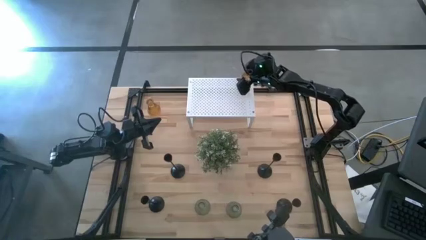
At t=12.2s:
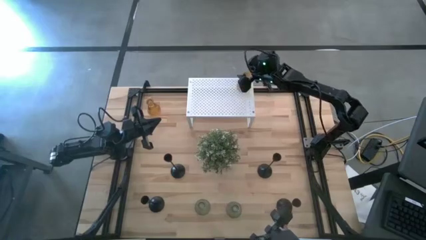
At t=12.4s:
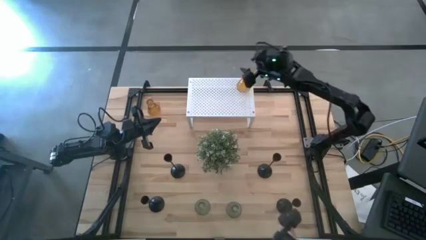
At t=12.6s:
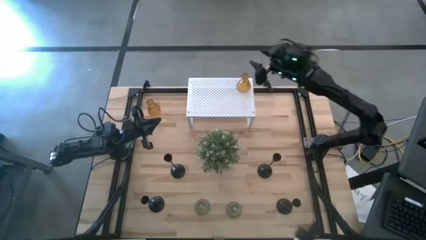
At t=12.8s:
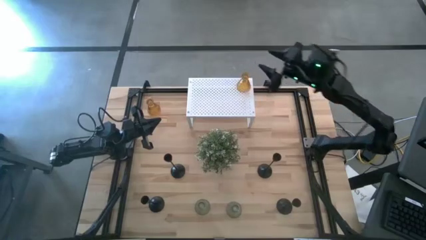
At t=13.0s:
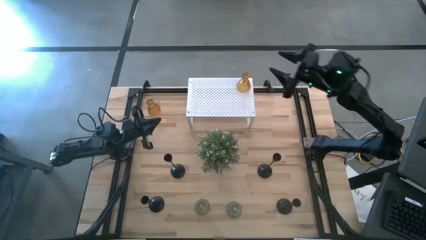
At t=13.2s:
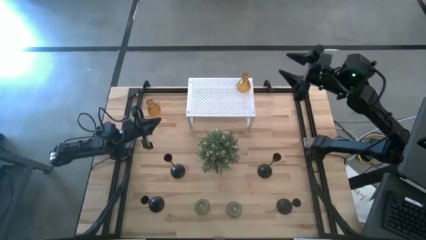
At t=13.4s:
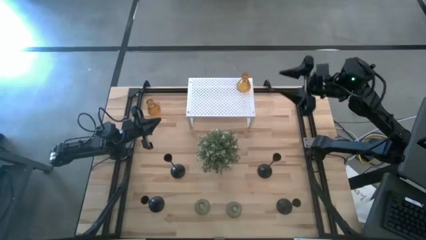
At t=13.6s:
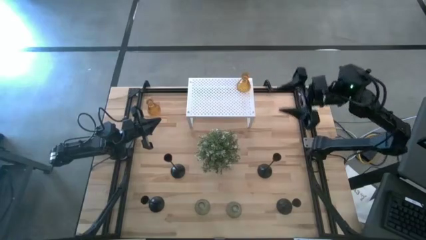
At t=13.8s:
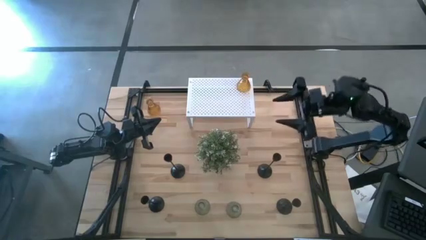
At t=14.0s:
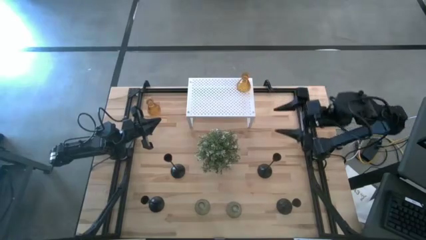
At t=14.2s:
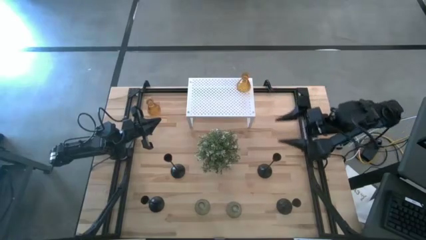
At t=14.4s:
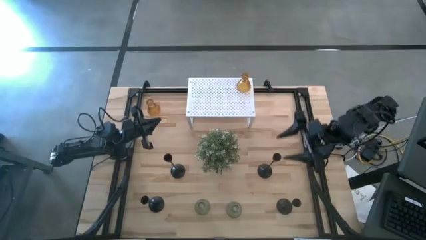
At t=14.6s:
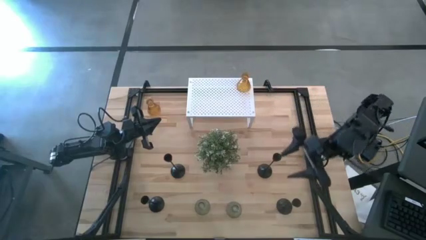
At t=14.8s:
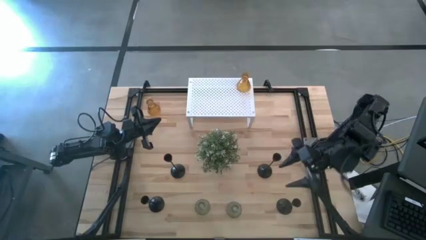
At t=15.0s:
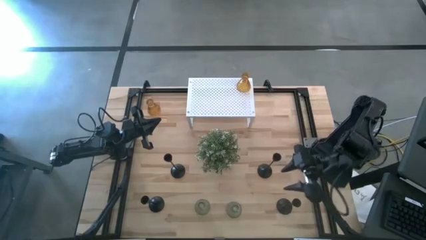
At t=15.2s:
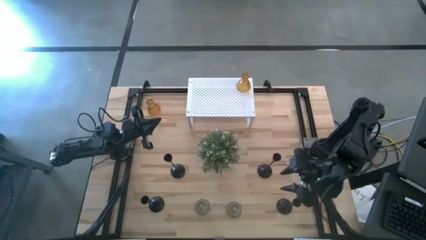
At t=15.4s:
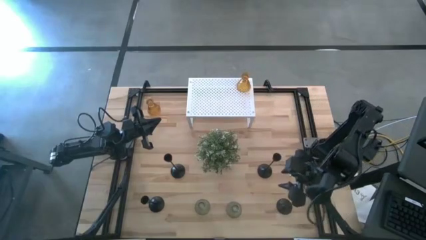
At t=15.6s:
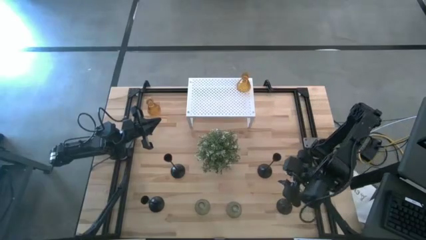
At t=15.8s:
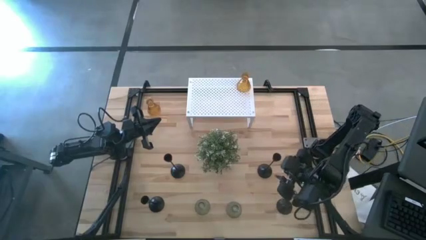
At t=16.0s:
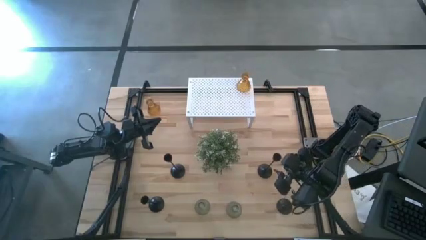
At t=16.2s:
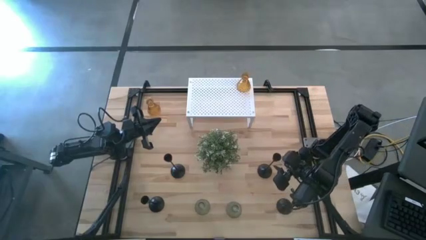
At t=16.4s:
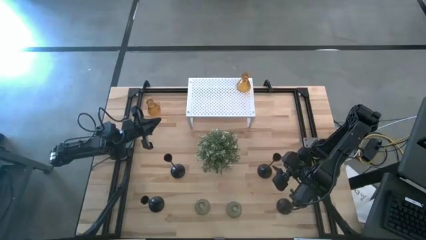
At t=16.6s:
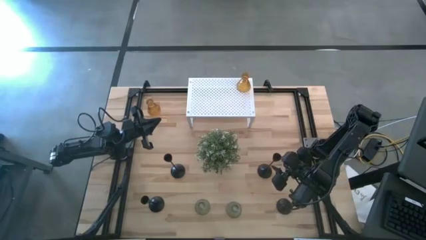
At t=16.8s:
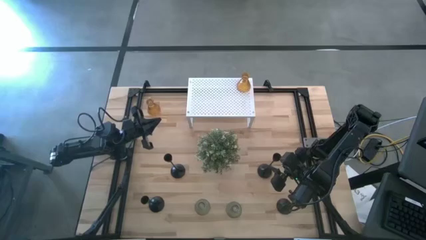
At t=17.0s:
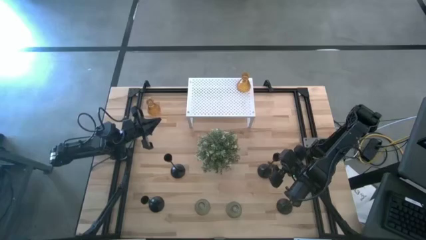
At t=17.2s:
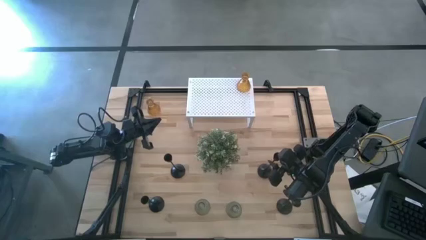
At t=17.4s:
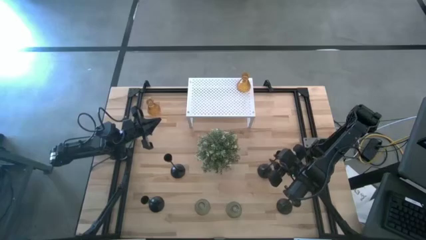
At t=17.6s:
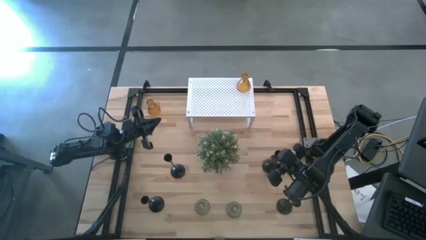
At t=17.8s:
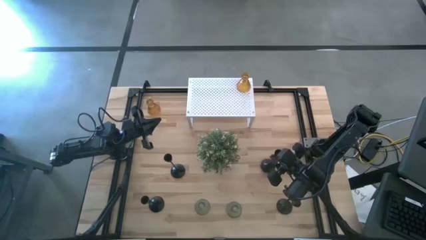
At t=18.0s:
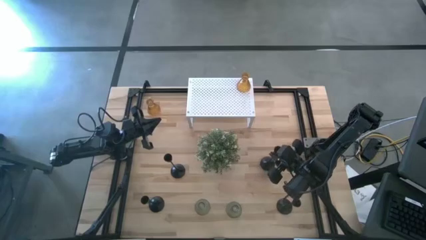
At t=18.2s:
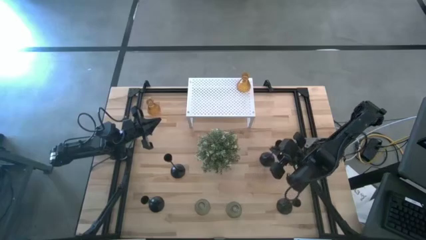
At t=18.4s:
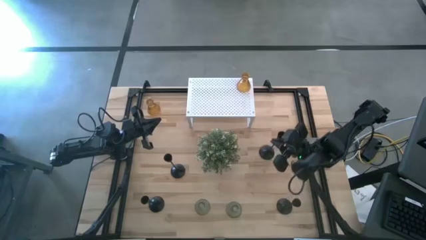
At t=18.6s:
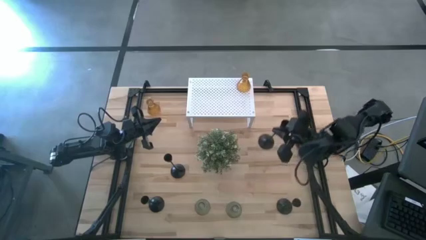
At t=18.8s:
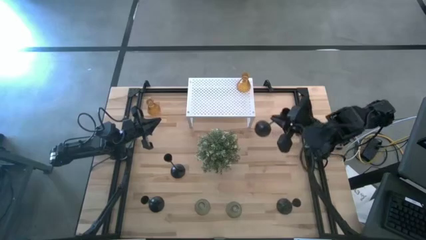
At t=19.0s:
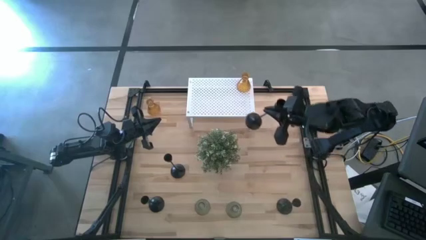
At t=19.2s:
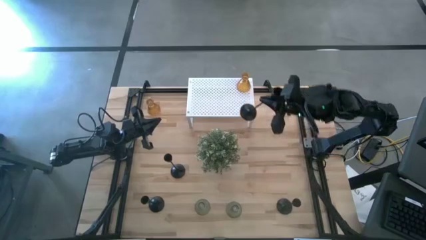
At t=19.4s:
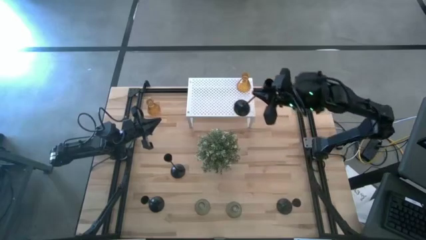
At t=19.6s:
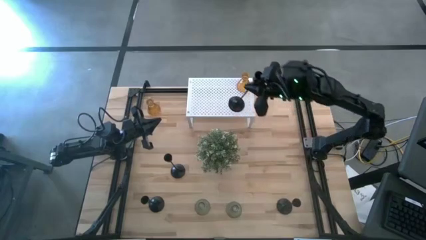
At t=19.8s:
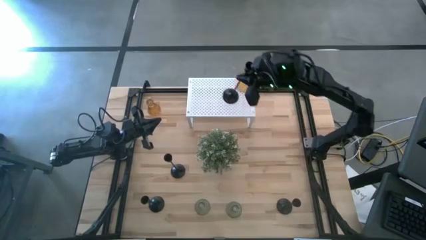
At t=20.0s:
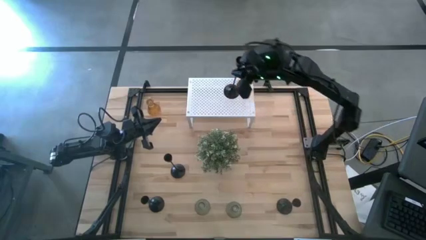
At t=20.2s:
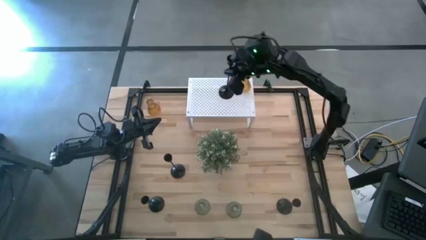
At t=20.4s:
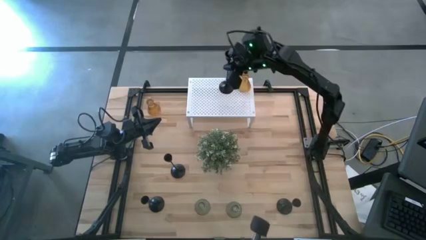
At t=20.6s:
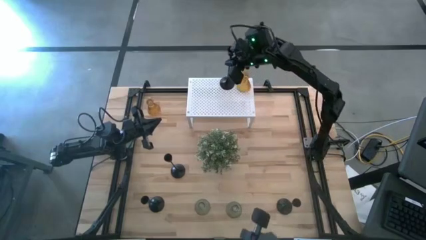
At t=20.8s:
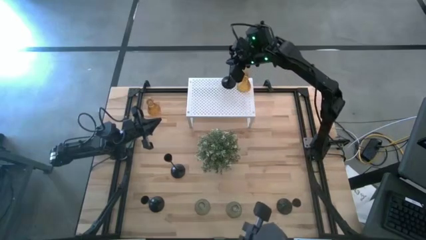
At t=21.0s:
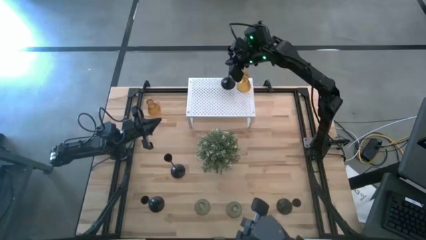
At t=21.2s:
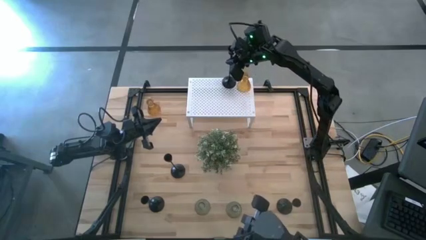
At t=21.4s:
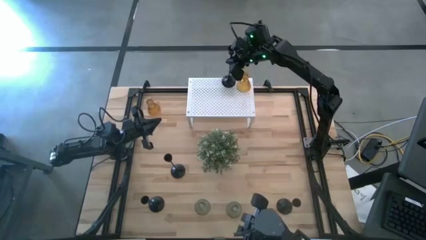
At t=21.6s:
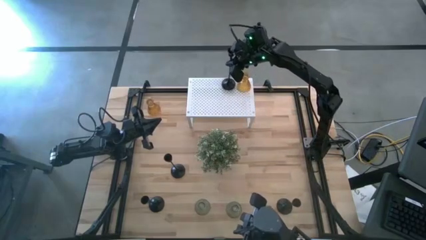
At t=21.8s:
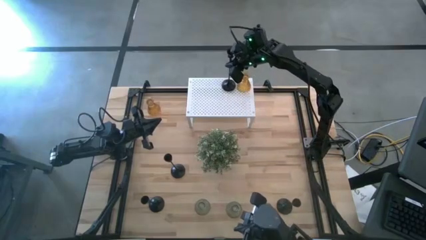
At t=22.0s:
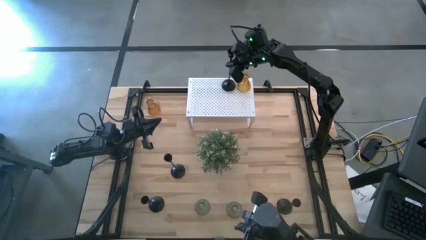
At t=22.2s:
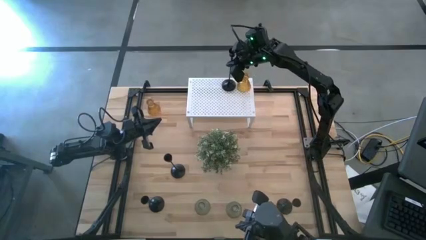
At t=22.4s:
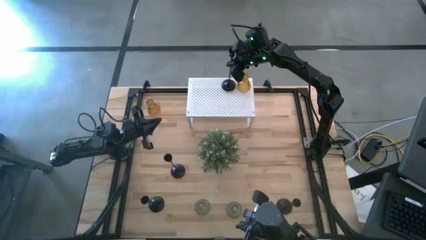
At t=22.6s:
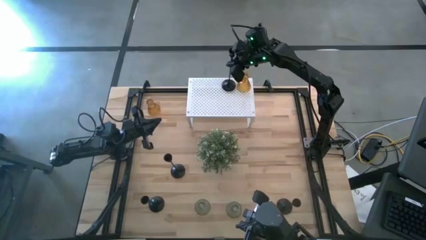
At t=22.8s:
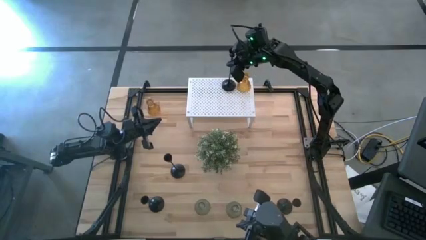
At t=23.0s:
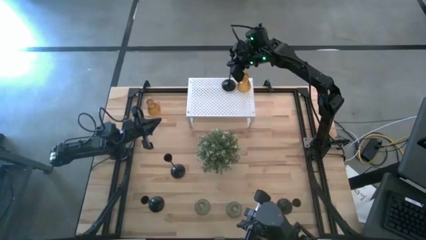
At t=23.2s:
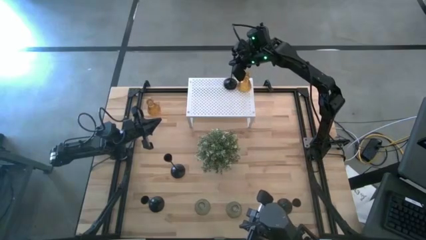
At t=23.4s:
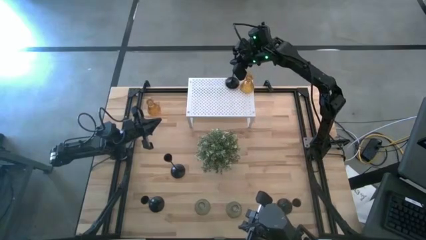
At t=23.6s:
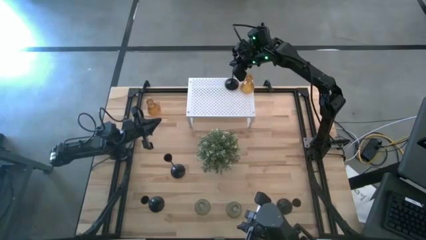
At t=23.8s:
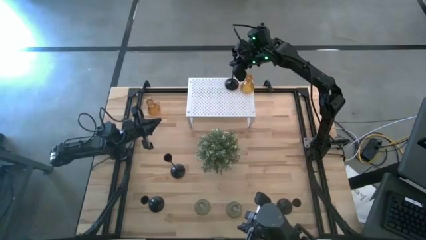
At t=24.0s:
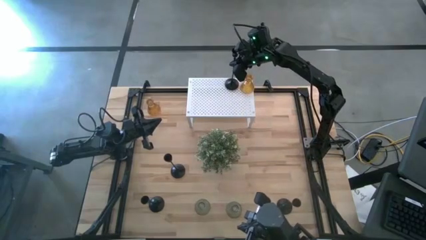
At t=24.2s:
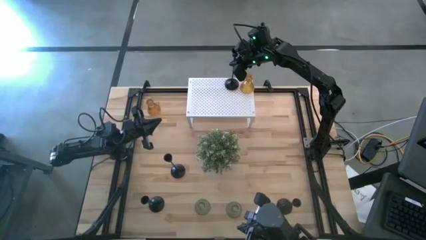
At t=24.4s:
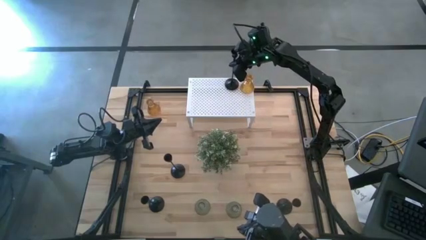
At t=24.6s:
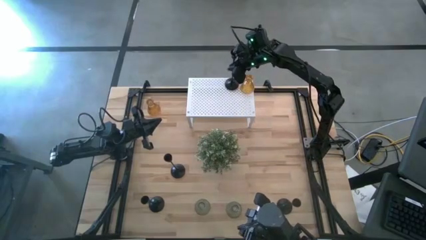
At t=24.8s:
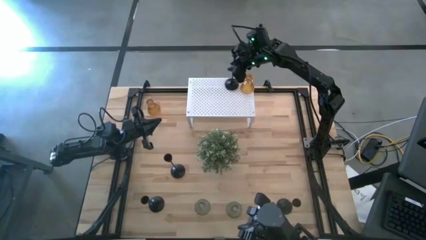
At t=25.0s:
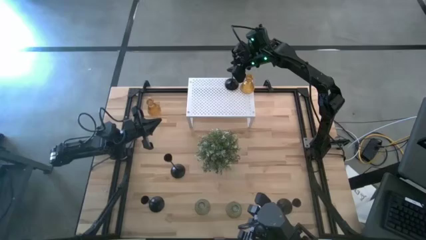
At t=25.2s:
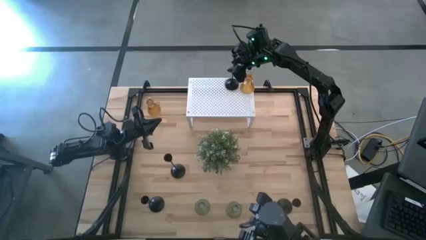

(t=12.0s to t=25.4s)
Task: Pick & Place candle stick holders
Put the right large black candle holder on the shelf

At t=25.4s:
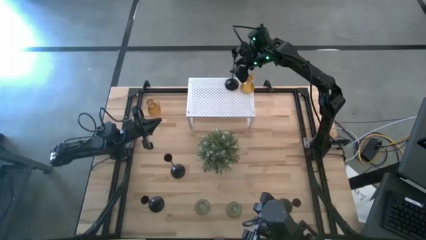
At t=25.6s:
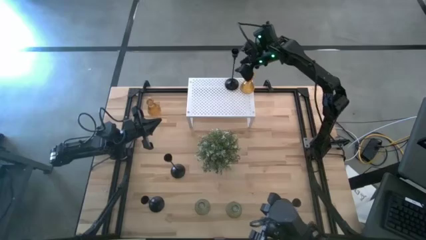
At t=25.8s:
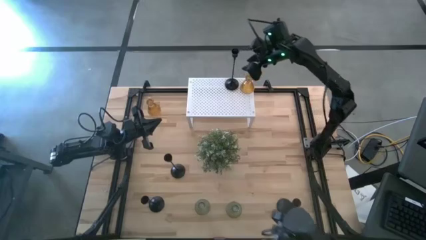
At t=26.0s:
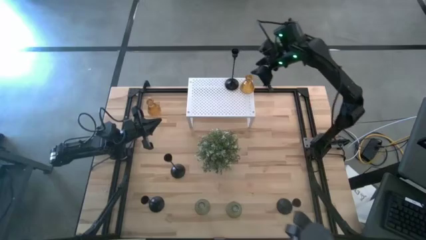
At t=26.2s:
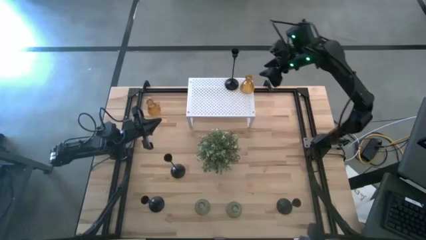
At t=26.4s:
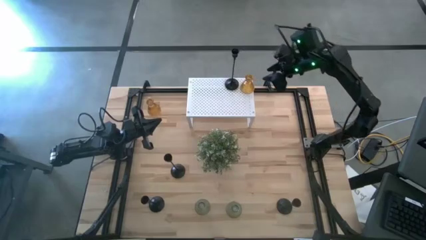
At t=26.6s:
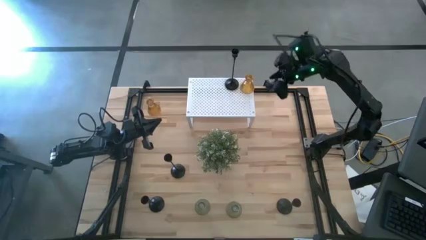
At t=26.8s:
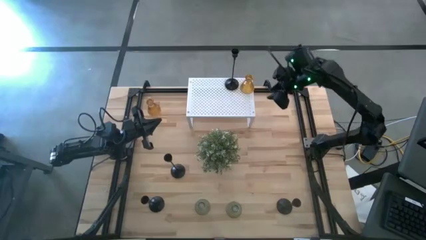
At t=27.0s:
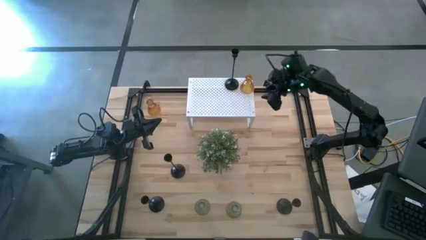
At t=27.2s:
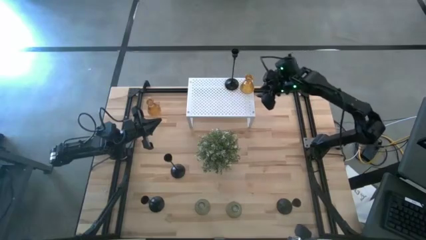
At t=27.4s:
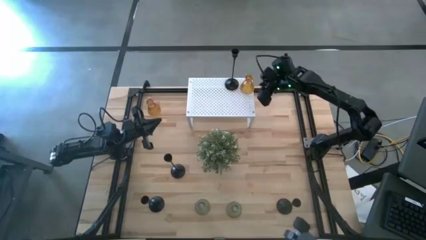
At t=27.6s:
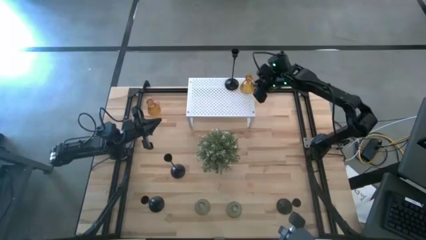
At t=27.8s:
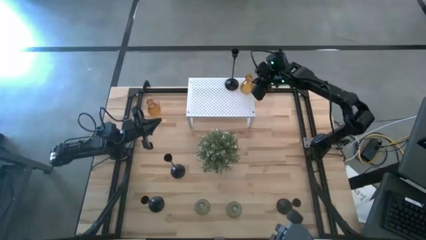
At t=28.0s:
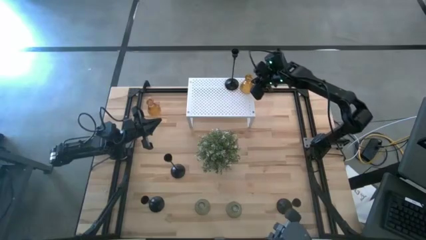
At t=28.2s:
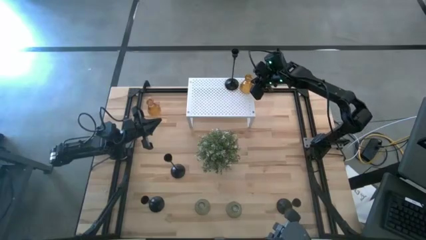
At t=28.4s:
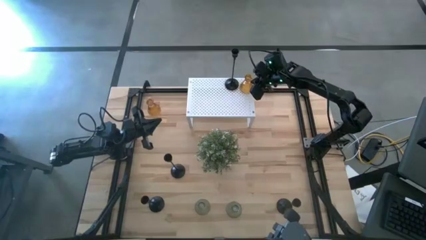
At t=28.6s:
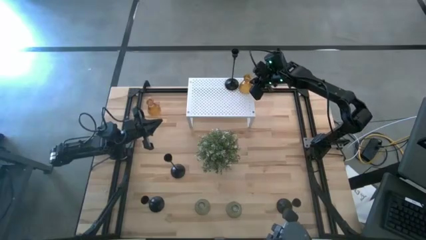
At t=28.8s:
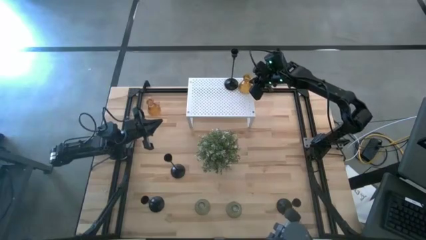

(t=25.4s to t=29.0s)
Adjust the orange glass candle holder on the shelf
